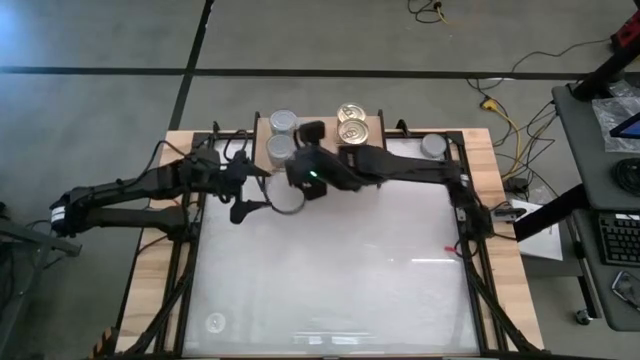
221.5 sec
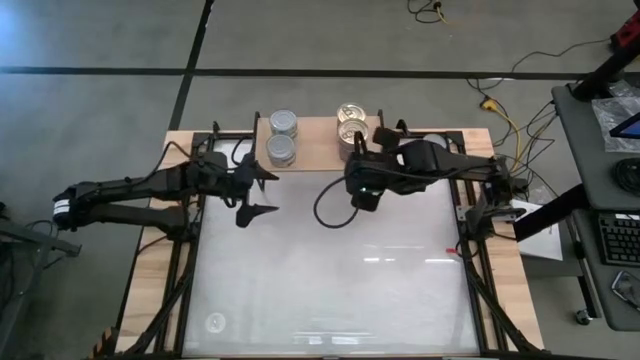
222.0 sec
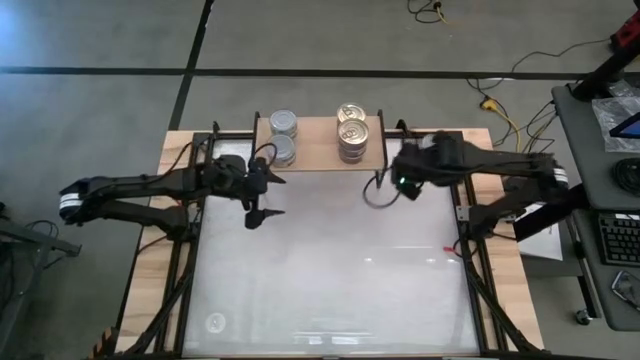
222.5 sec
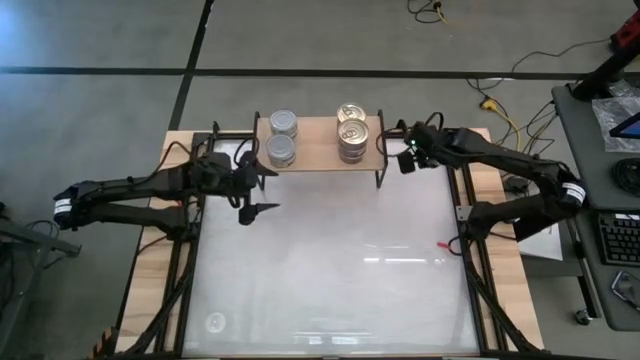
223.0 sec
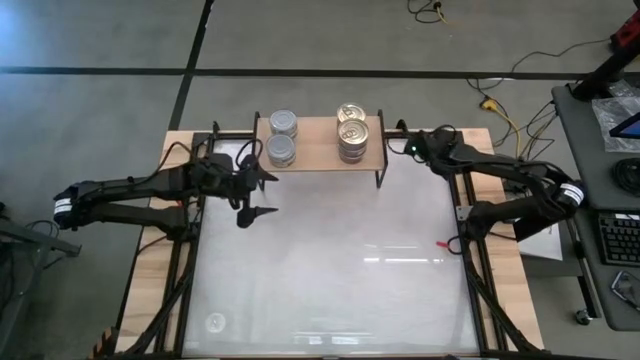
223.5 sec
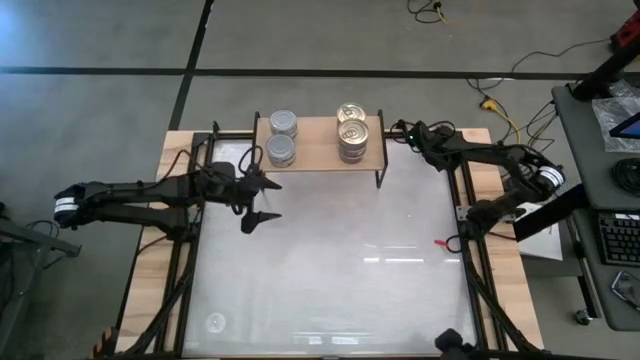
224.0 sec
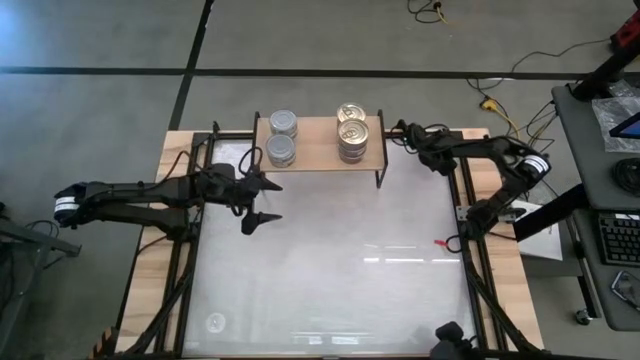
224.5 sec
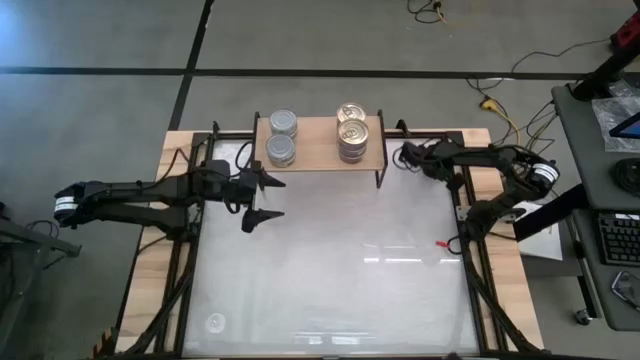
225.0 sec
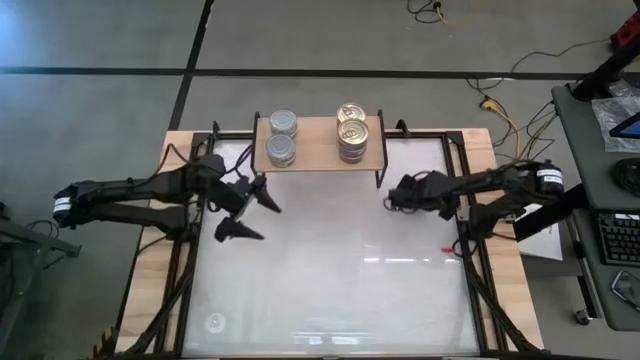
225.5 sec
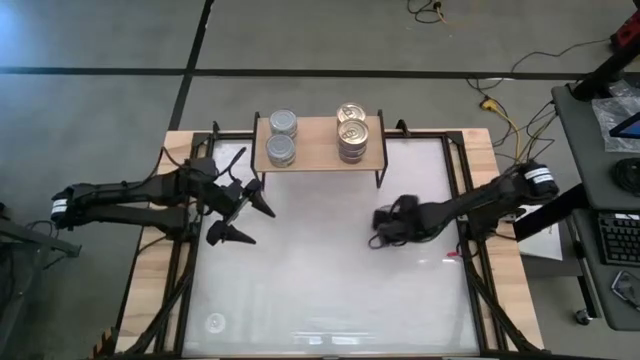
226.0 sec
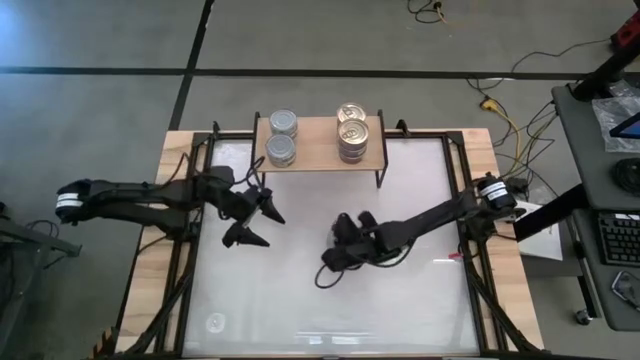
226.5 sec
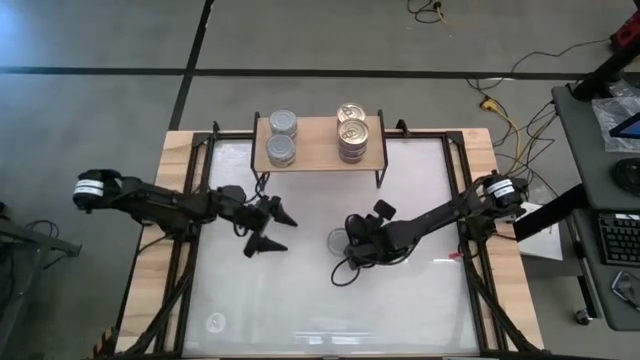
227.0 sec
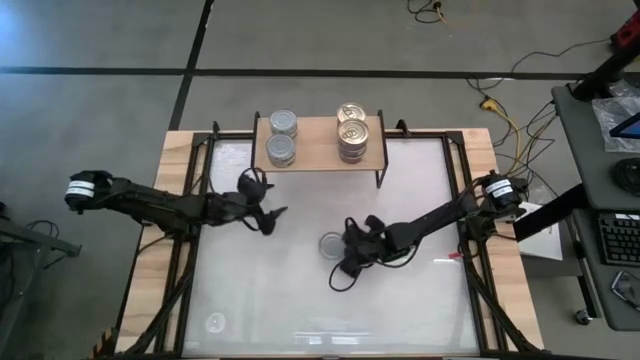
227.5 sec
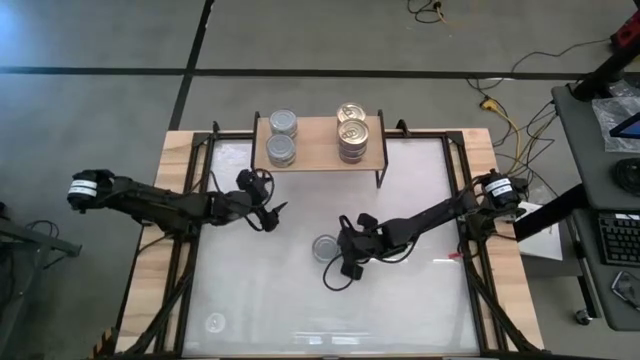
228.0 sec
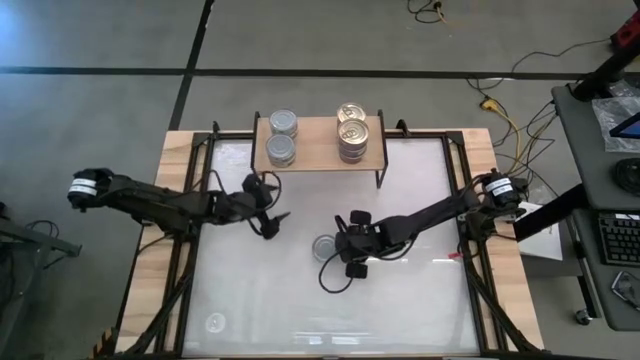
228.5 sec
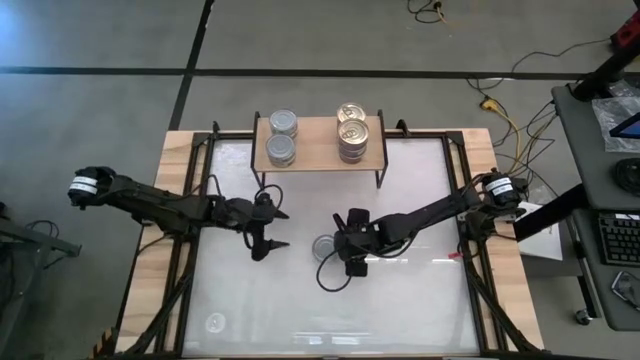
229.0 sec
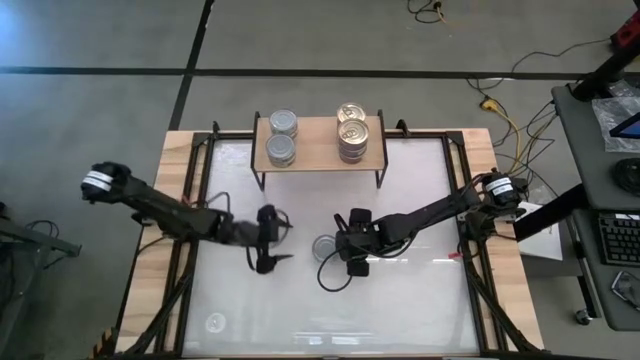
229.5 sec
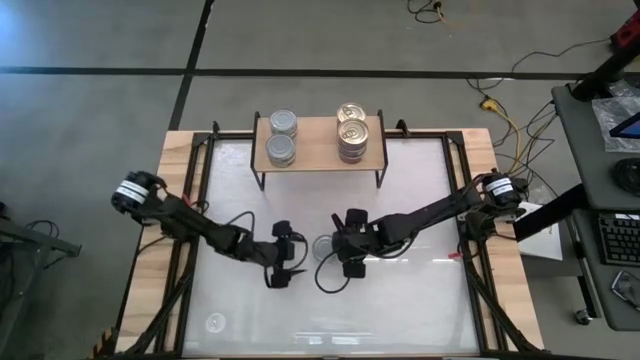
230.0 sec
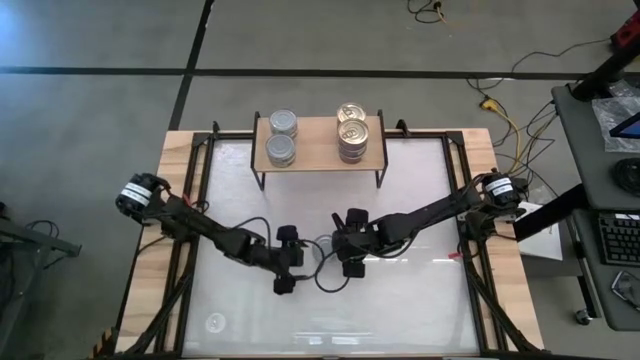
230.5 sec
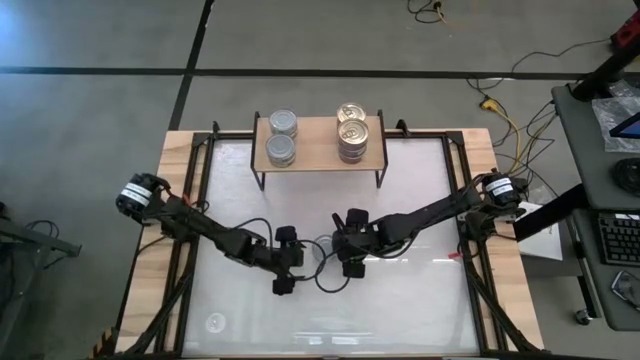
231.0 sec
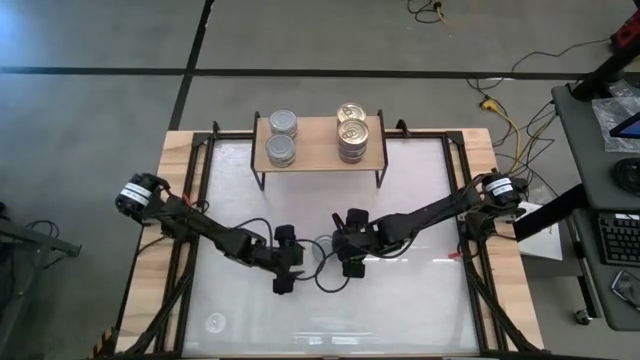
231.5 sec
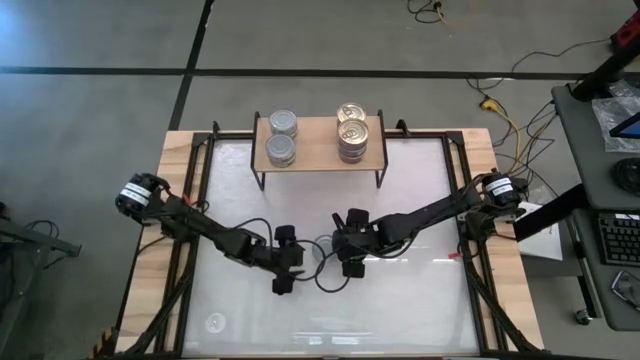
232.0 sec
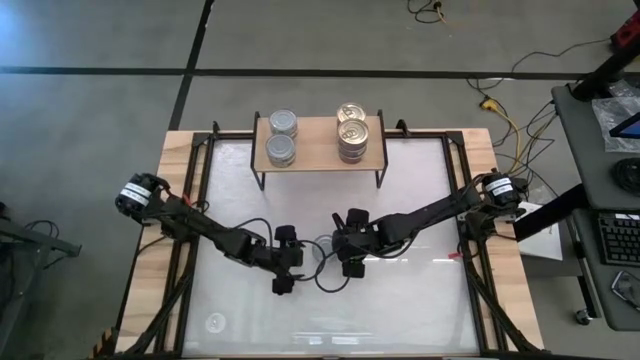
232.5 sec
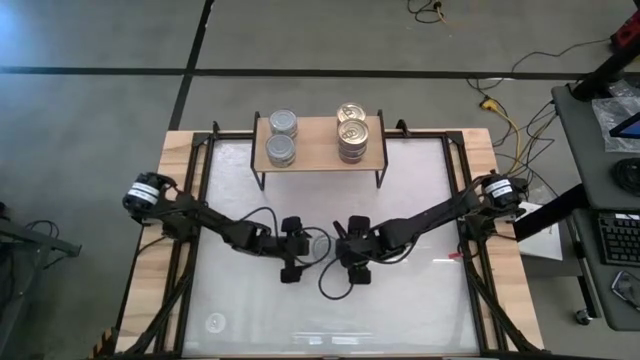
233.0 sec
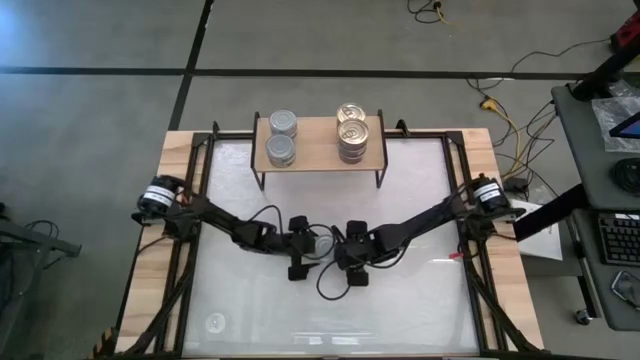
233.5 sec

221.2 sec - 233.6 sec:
Task: Stack canned seafood by type on shelf
Stack the green tuna can on top of the other green tuna can

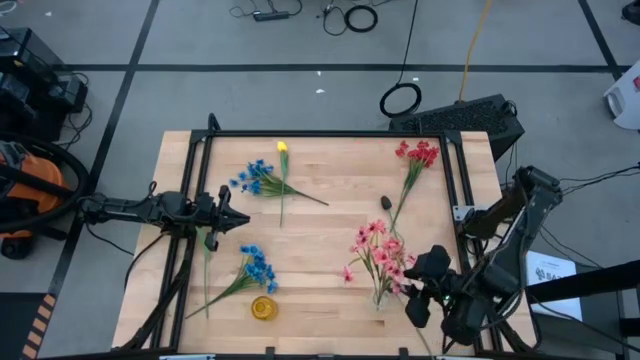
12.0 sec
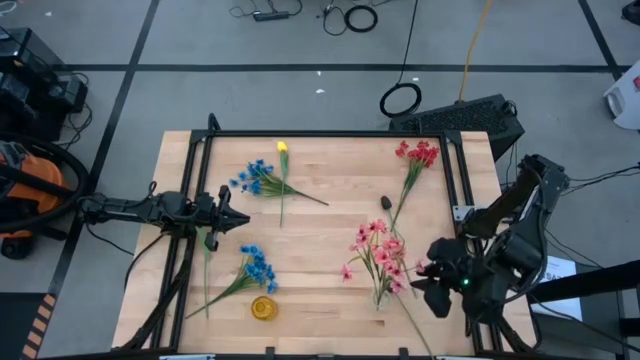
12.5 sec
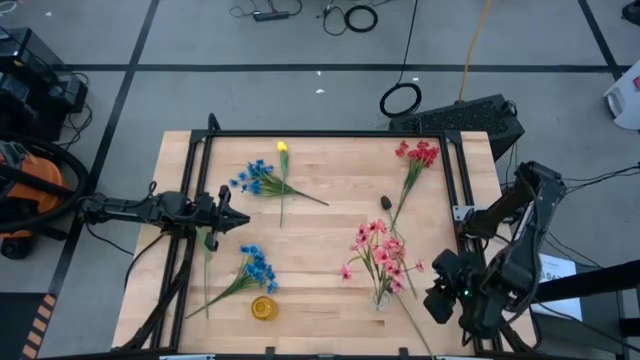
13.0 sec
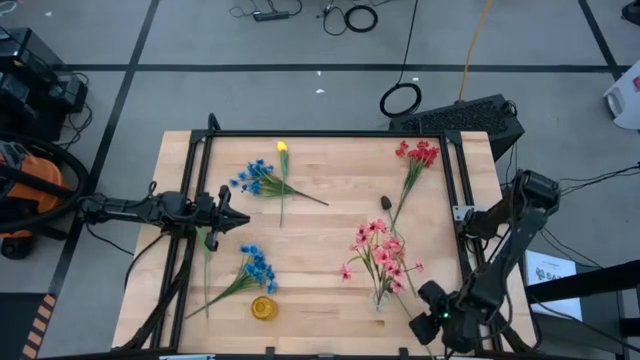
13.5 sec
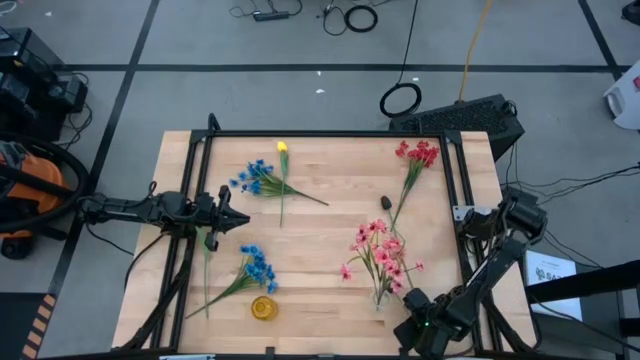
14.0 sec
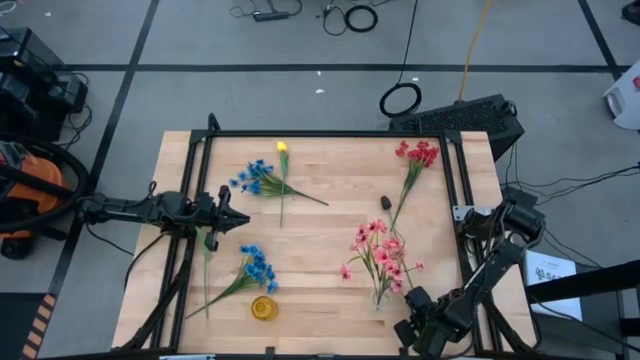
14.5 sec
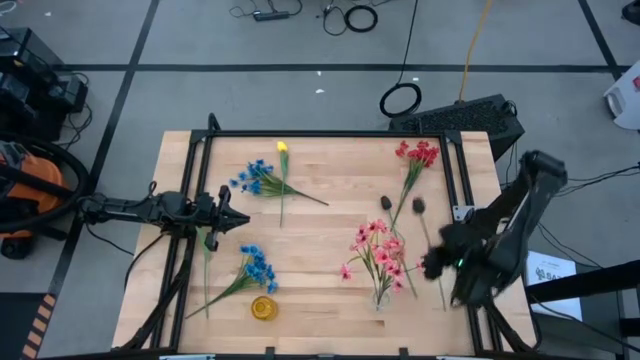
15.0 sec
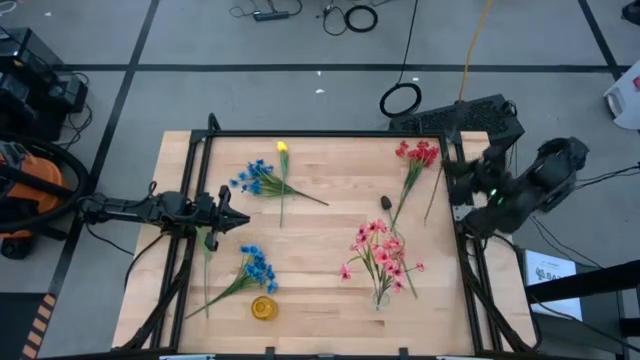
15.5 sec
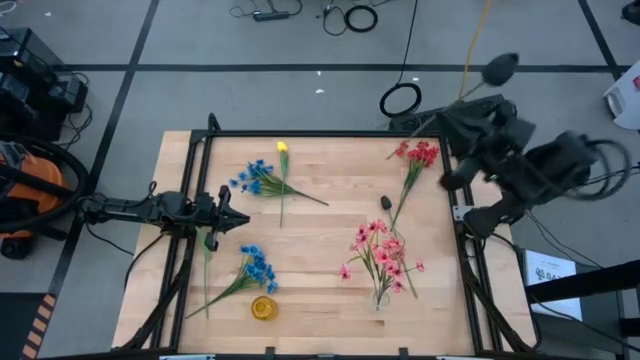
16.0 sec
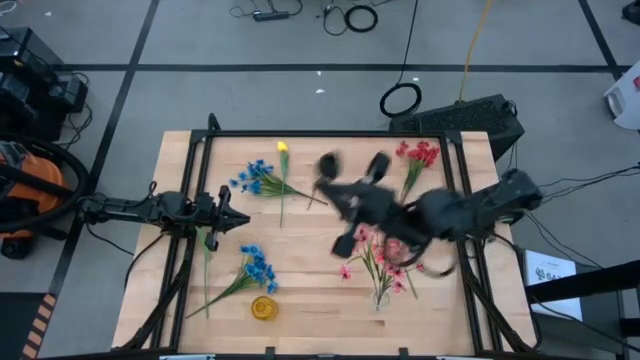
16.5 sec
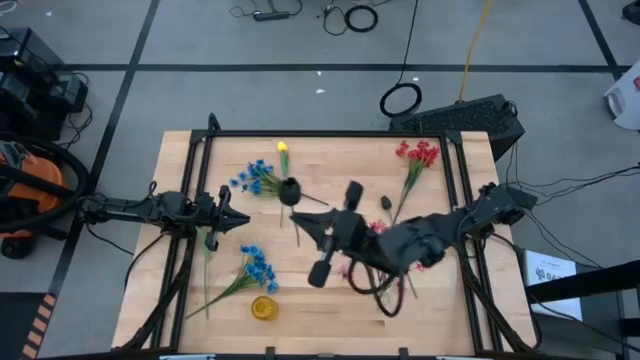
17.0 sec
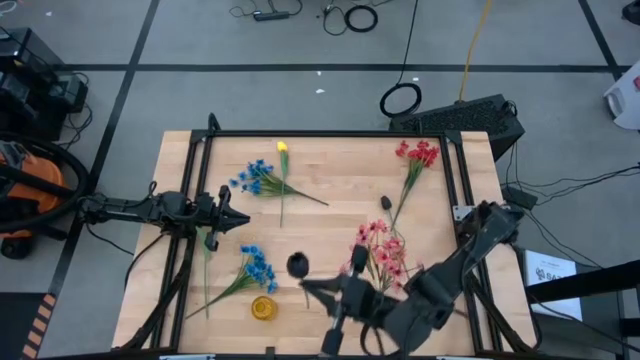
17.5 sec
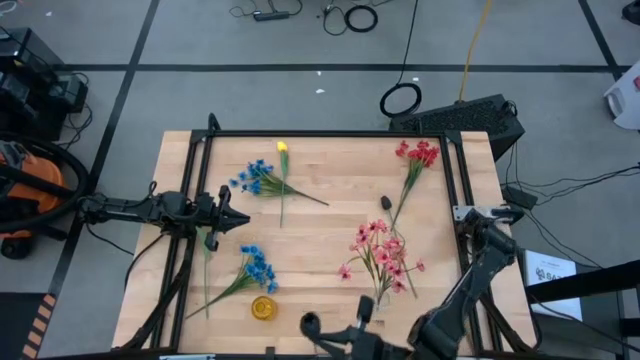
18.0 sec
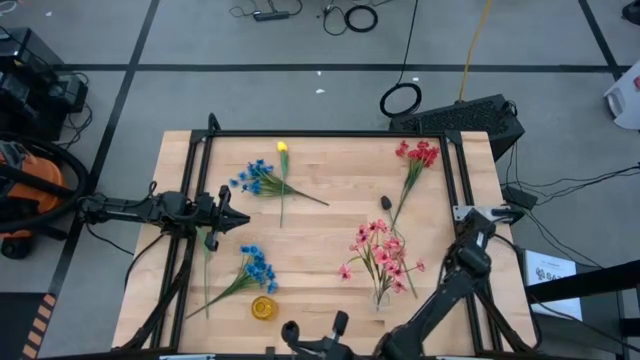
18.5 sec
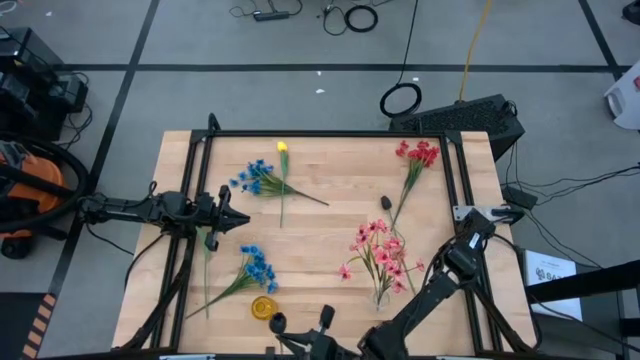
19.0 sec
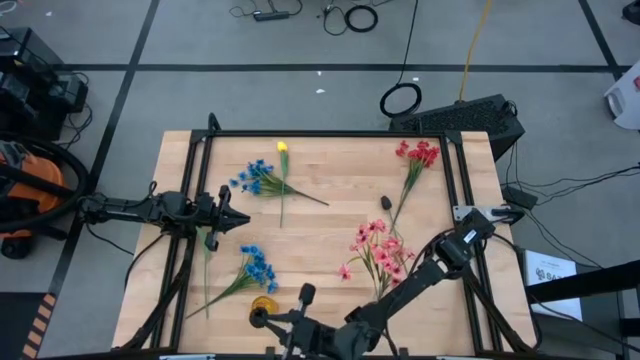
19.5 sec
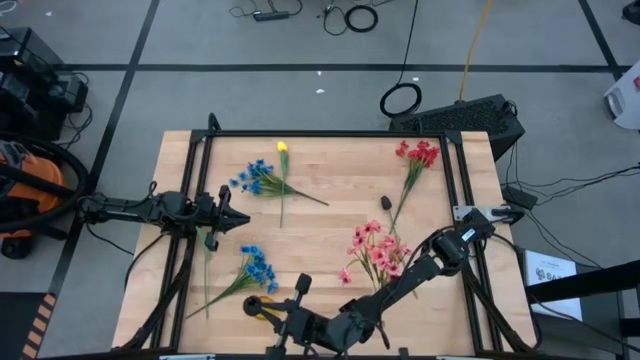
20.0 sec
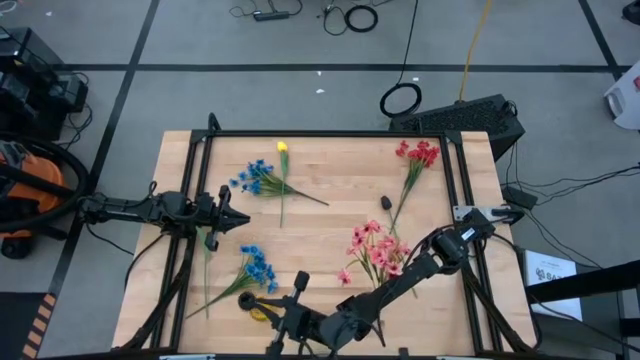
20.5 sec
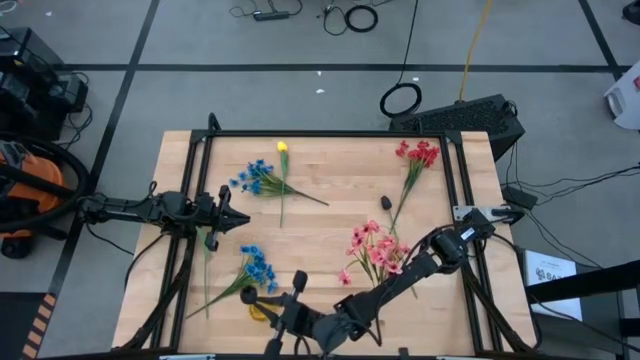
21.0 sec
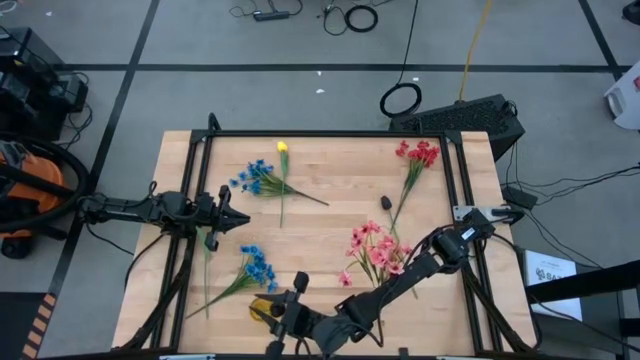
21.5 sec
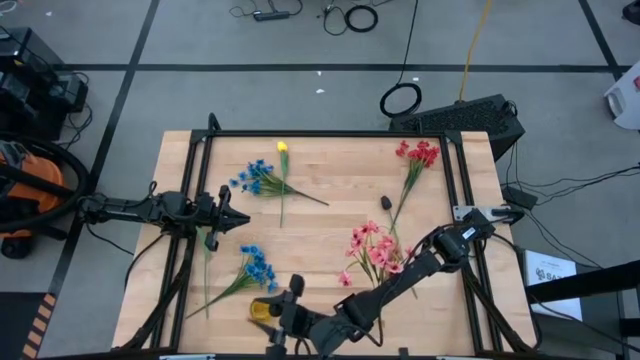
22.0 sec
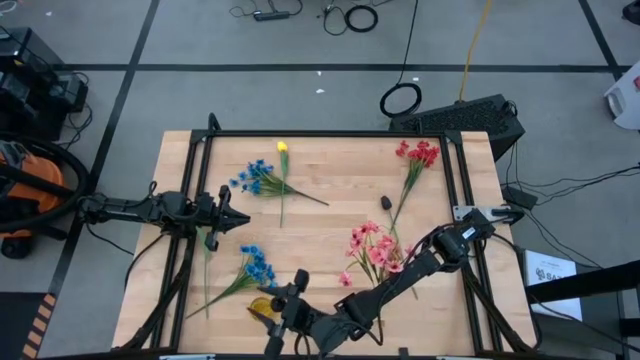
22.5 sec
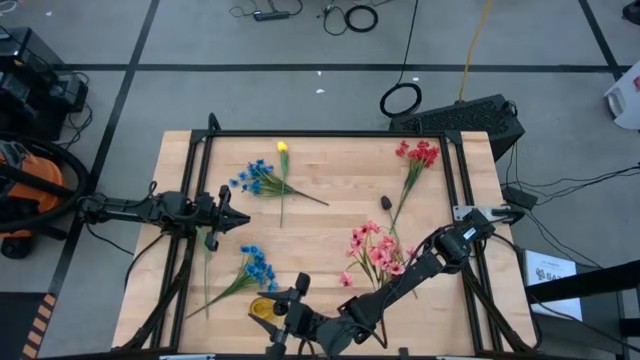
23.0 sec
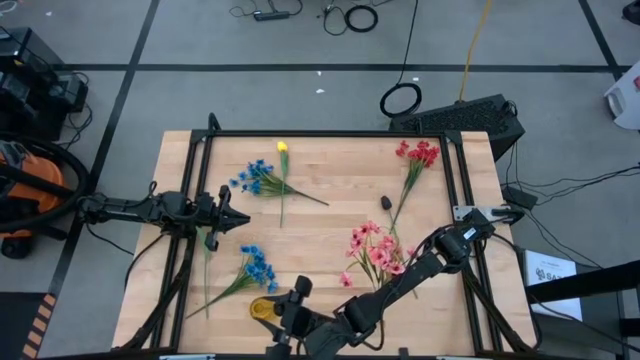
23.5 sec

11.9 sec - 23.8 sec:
Task: Sort flowers into vase by color
Put the bottom black tulip into the yellow vase
